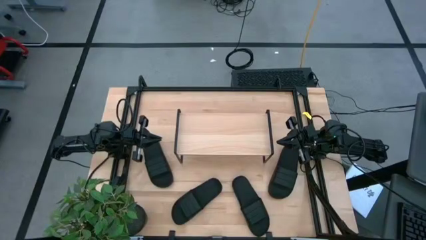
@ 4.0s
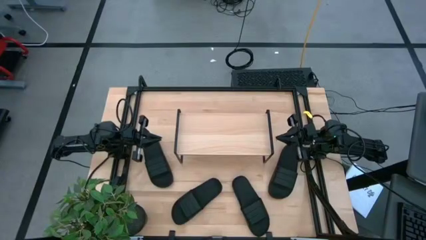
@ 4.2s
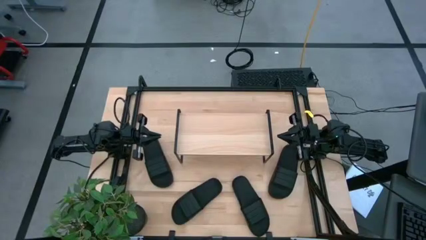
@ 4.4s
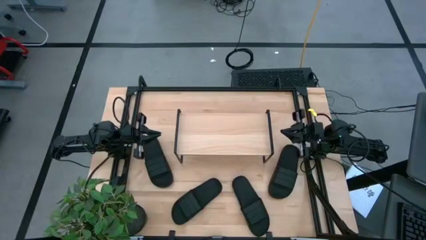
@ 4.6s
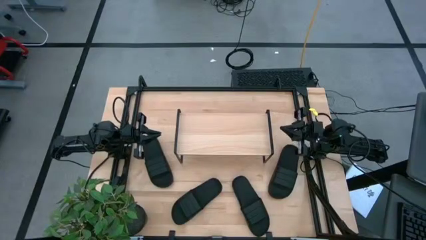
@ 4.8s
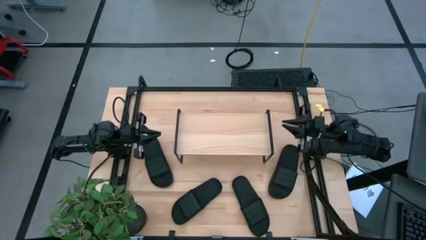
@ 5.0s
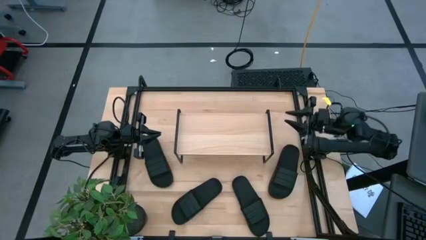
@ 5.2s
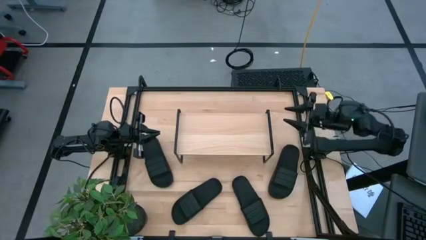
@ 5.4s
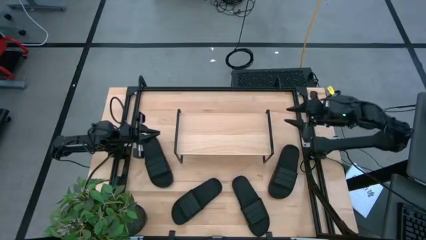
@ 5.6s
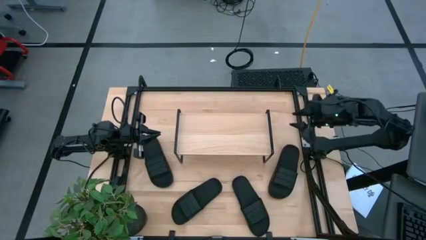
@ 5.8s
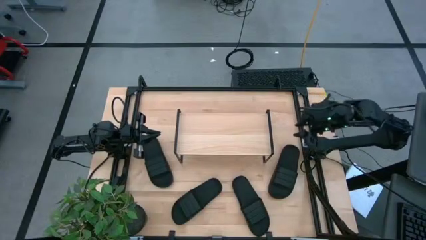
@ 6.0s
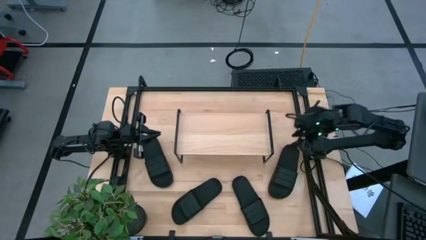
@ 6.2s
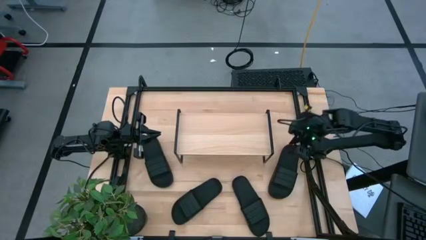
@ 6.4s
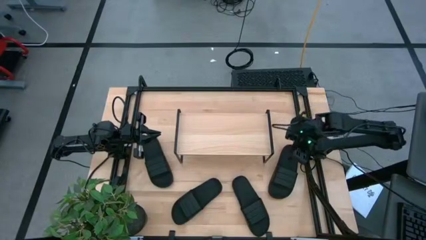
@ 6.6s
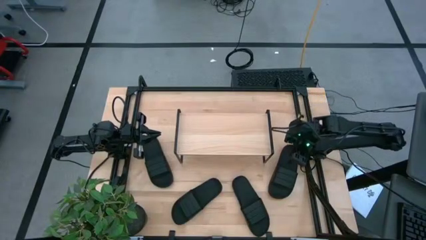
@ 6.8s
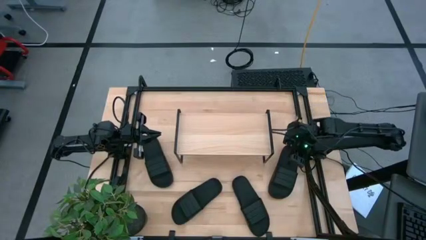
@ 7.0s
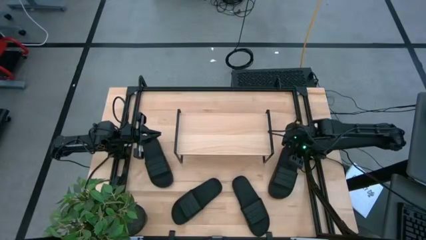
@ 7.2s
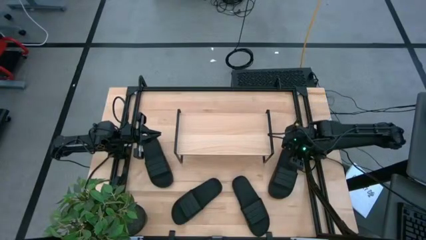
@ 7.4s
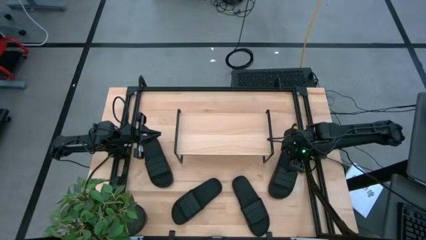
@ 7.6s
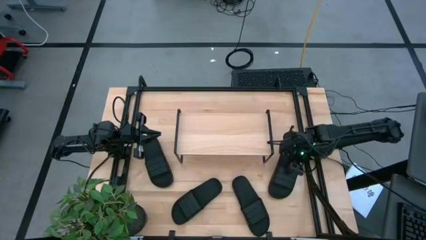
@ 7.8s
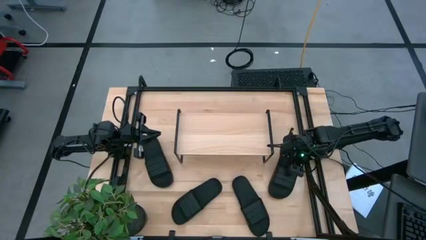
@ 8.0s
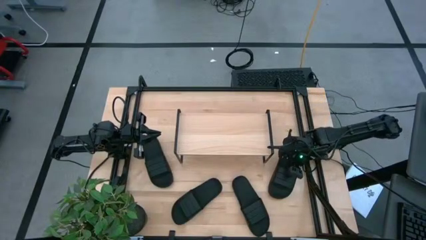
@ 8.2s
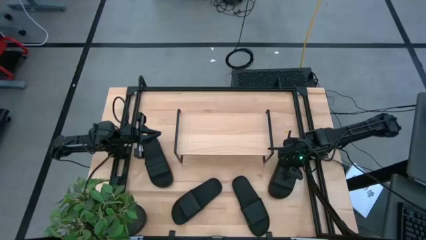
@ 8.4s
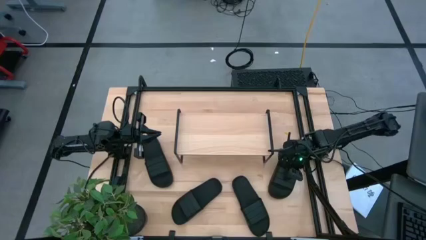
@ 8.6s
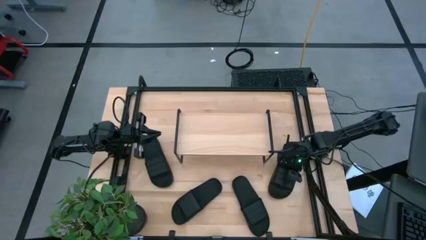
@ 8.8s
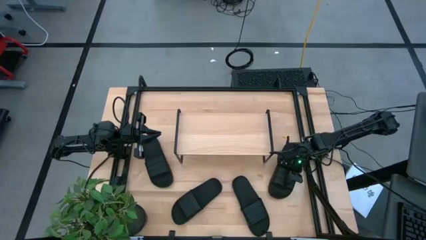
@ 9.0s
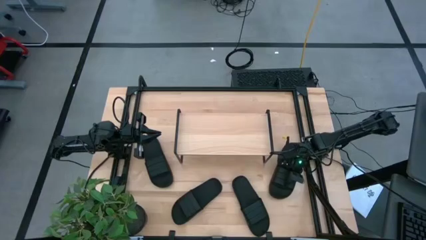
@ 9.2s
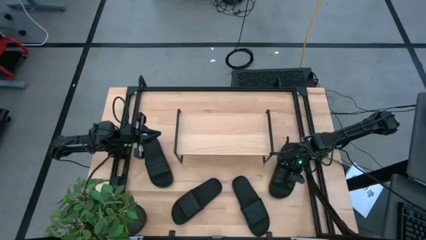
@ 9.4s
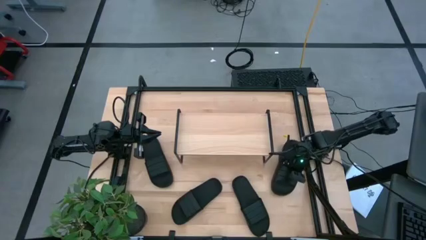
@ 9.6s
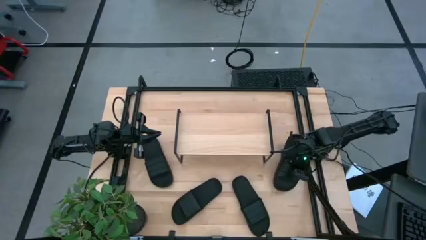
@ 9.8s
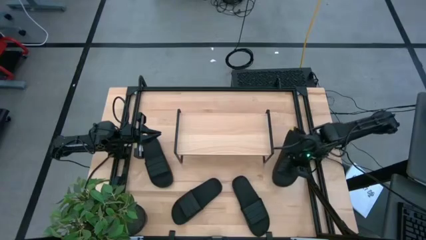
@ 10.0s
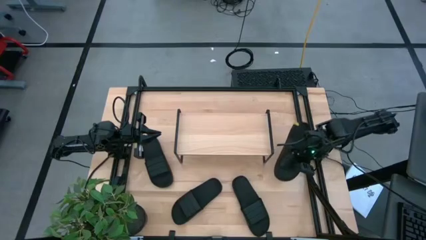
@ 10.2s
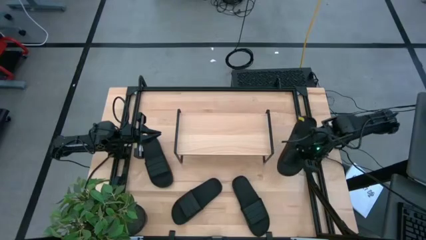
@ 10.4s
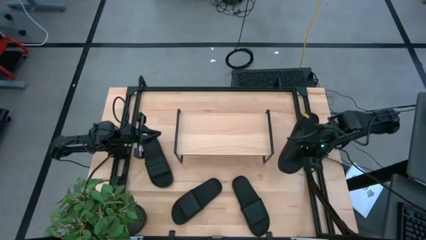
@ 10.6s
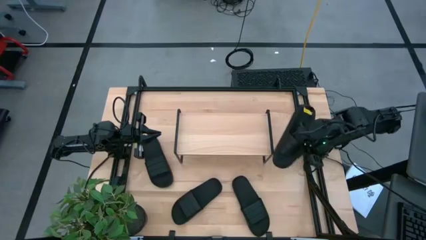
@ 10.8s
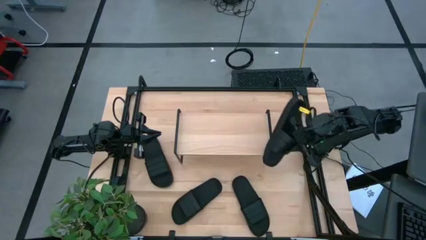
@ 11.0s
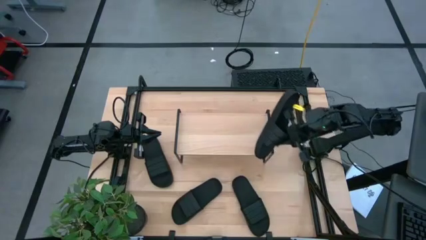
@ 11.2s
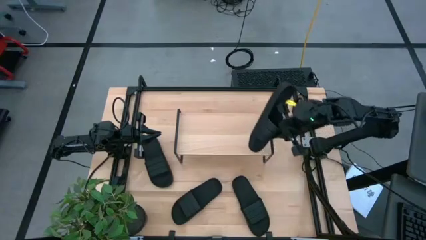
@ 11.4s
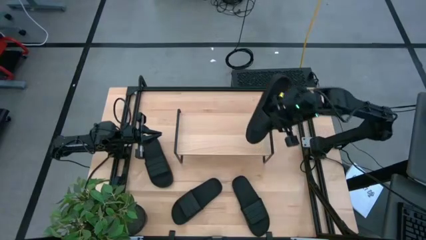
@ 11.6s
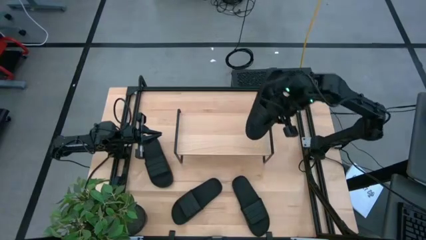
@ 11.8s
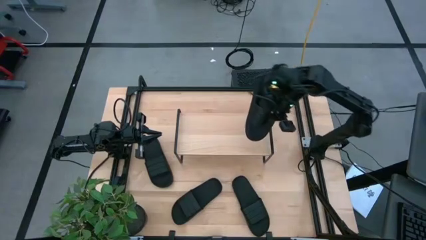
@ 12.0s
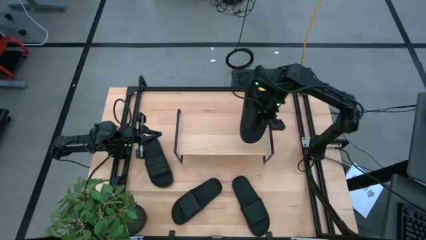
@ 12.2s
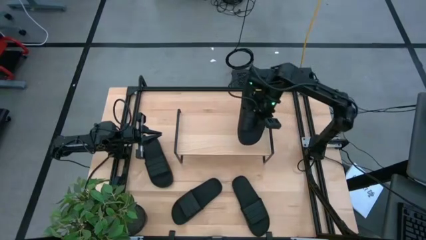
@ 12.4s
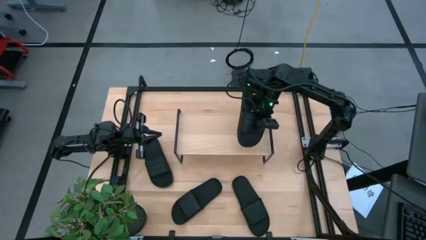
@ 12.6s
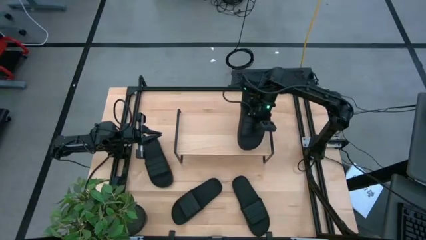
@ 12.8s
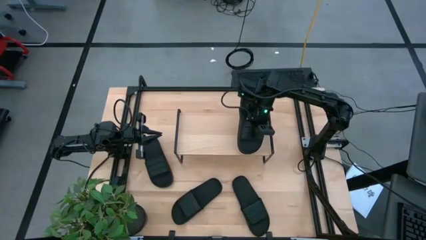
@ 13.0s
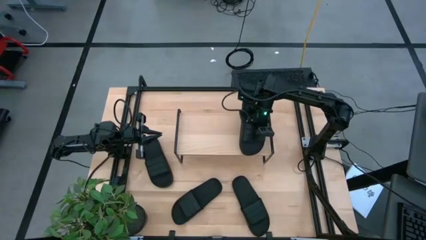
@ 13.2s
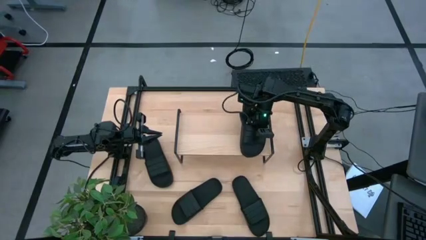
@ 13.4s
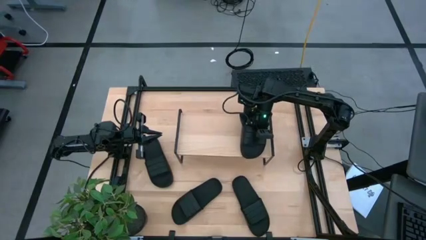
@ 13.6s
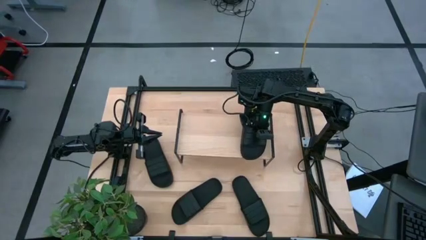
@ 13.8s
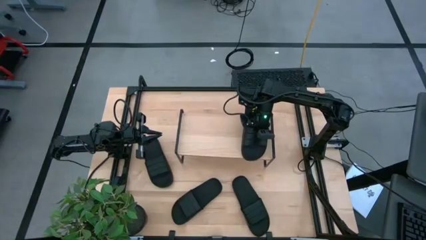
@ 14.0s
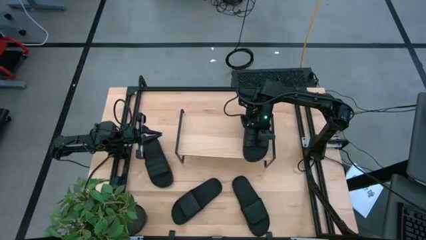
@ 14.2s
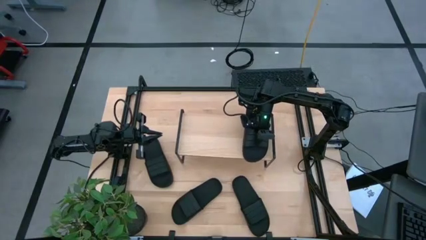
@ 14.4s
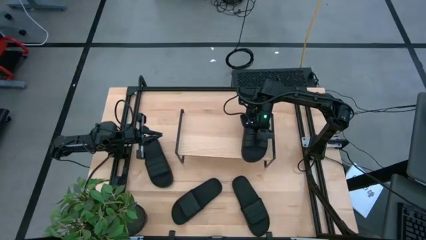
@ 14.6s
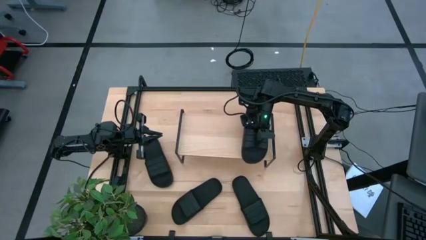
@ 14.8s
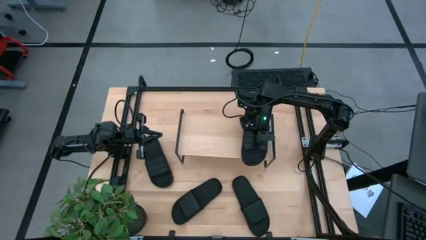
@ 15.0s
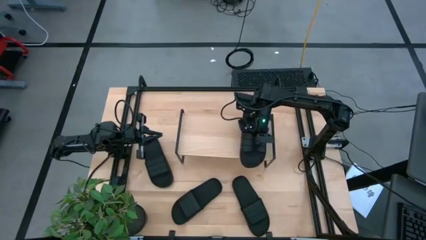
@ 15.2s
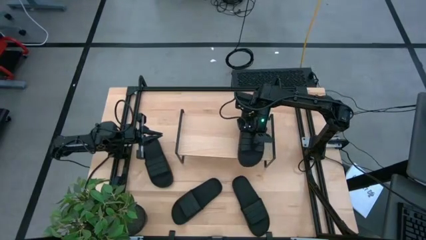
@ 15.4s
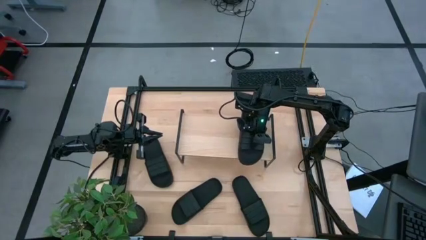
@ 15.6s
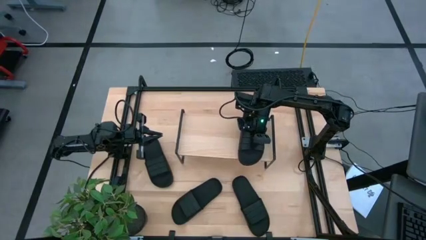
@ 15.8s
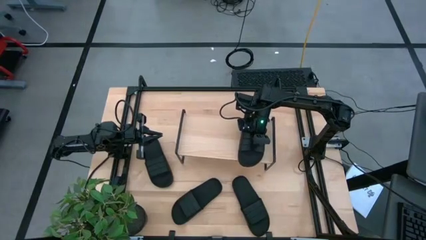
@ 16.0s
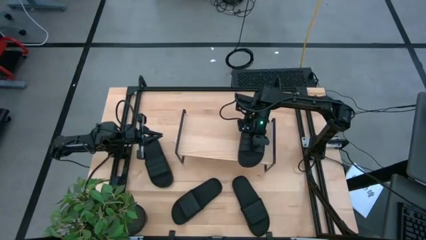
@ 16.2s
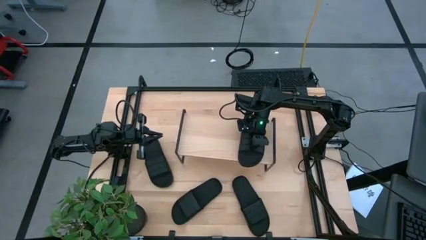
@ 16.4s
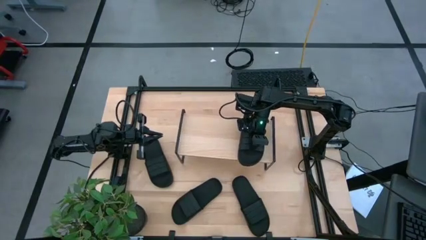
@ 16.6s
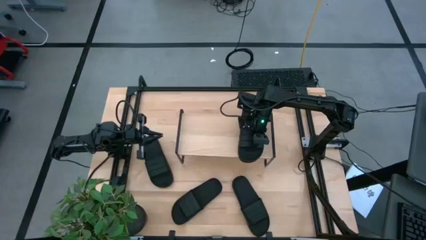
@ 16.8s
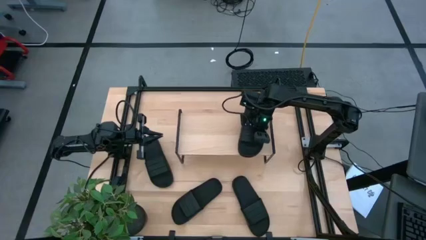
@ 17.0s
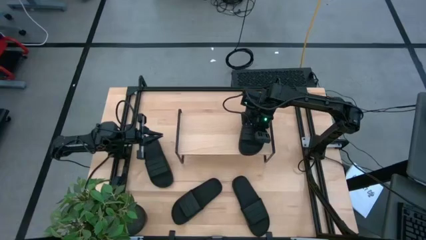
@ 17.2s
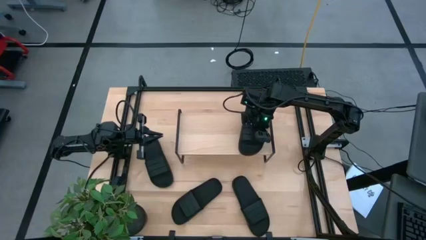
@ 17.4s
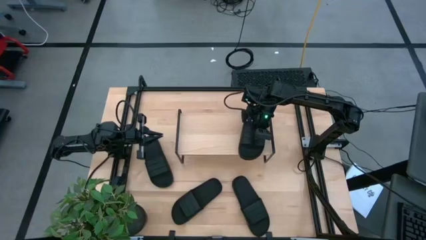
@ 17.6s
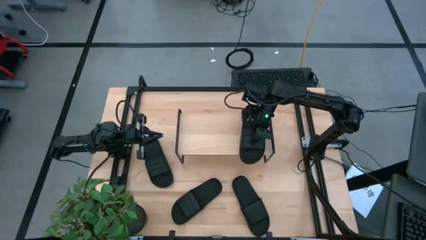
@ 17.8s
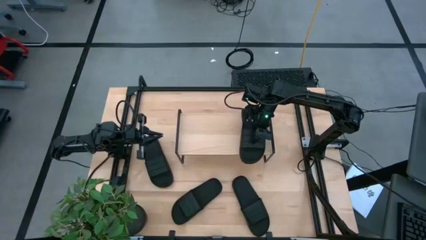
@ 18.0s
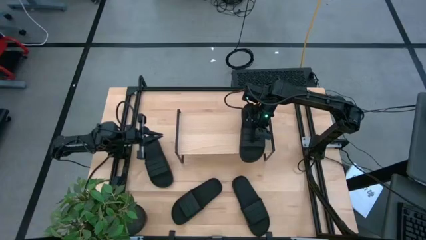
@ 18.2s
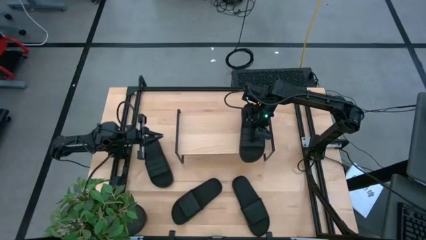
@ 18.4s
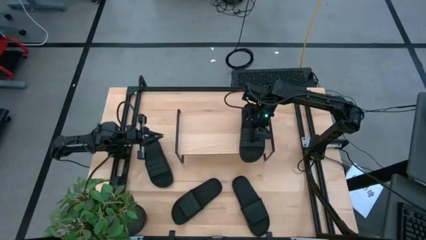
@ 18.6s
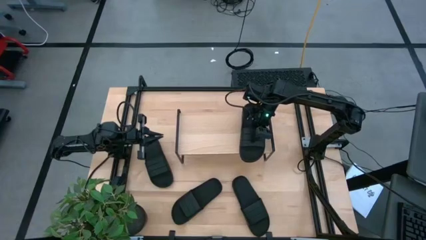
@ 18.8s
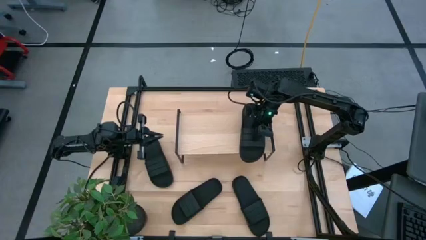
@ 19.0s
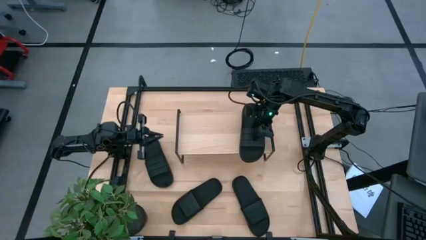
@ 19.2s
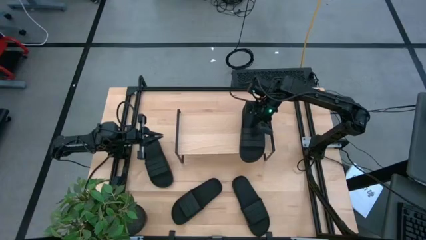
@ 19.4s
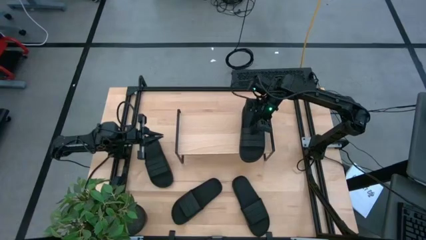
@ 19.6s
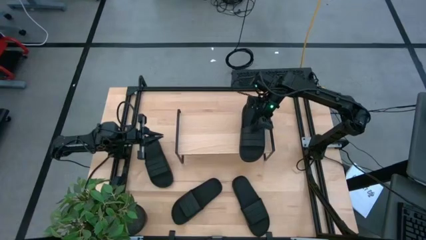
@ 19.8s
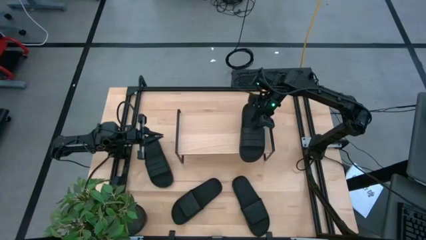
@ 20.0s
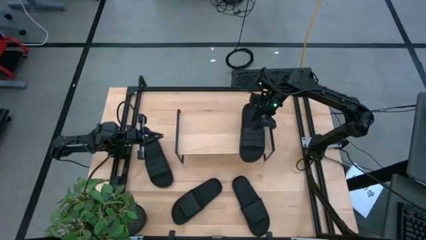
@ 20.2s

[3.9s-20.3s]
Task: Pick and place slides into the shelf
Put the right black slide on the shelf
